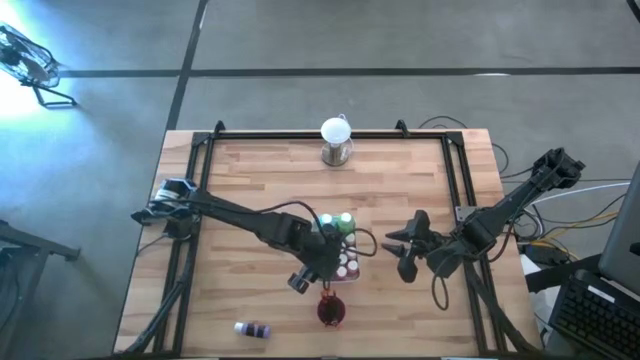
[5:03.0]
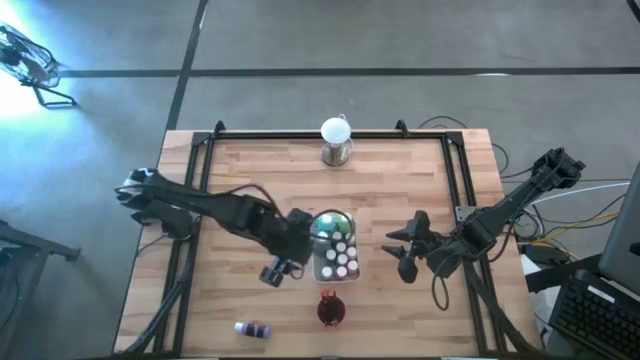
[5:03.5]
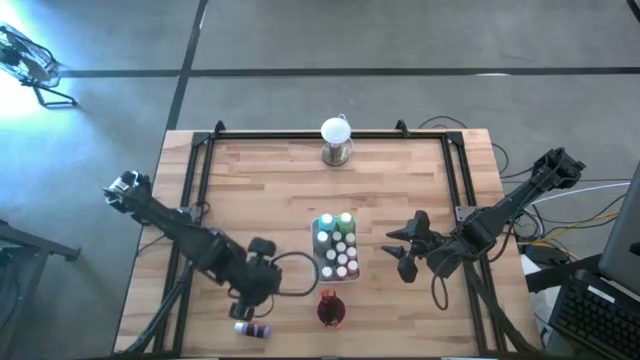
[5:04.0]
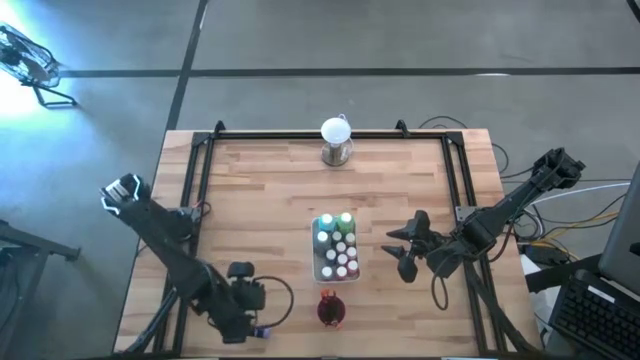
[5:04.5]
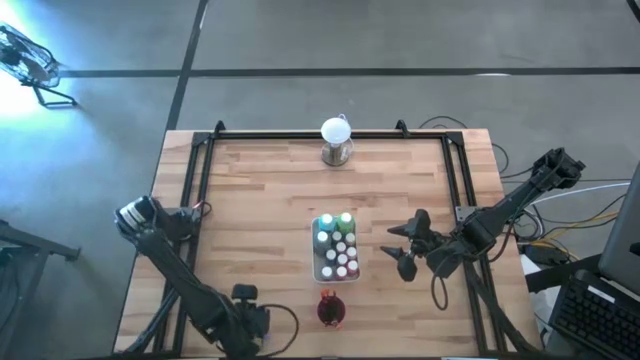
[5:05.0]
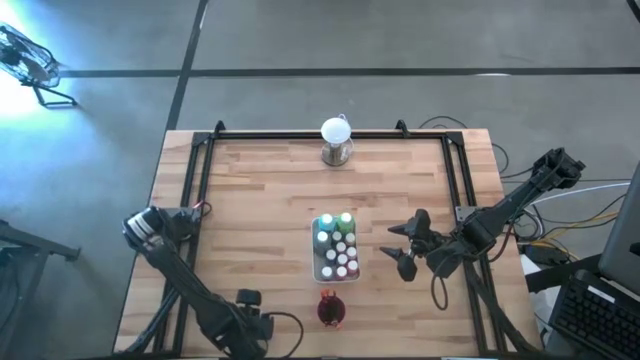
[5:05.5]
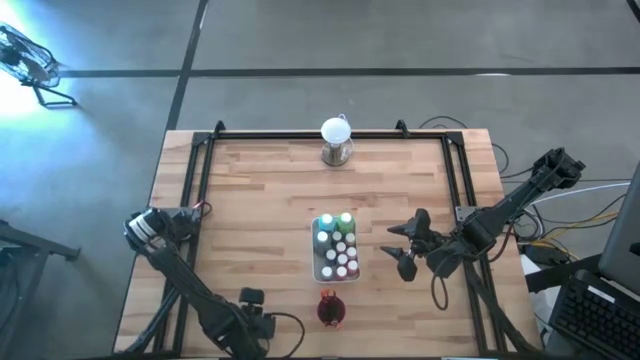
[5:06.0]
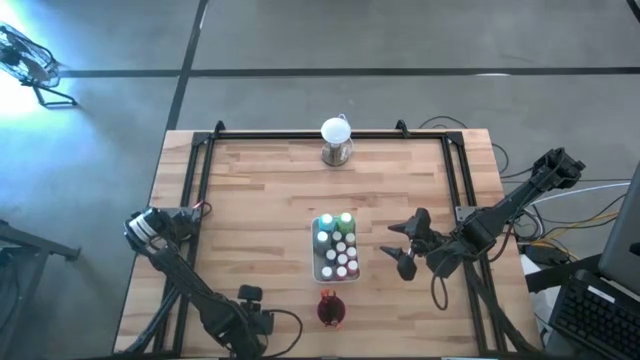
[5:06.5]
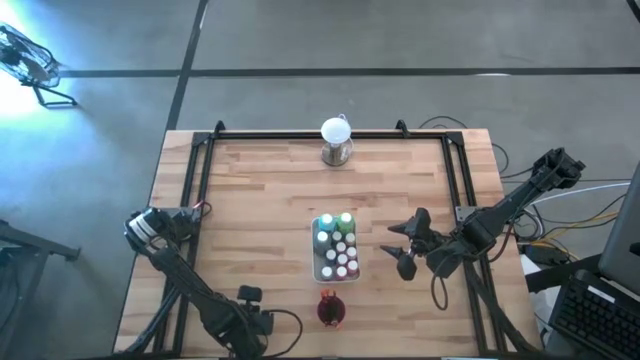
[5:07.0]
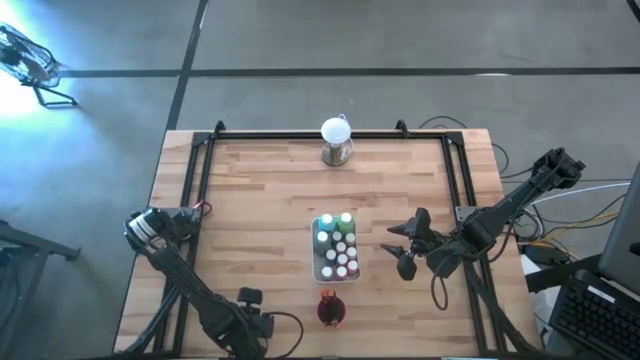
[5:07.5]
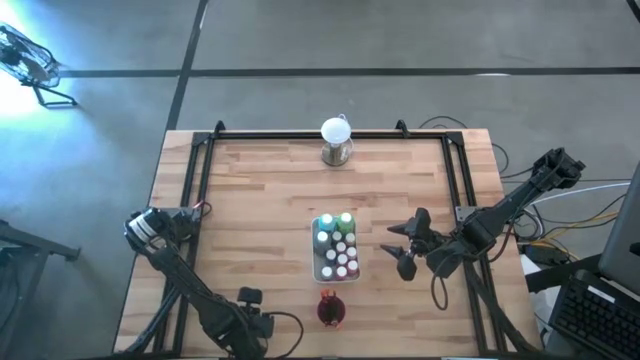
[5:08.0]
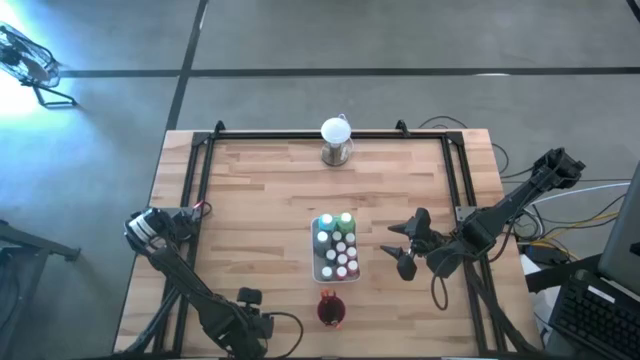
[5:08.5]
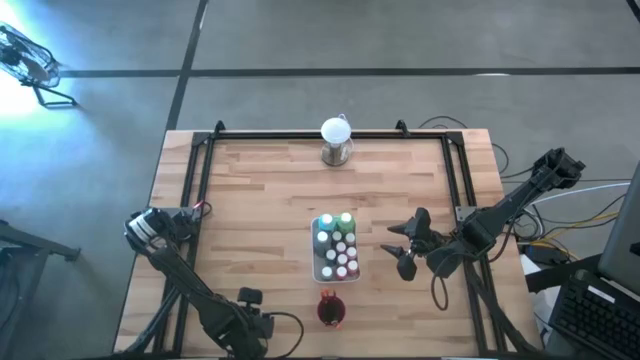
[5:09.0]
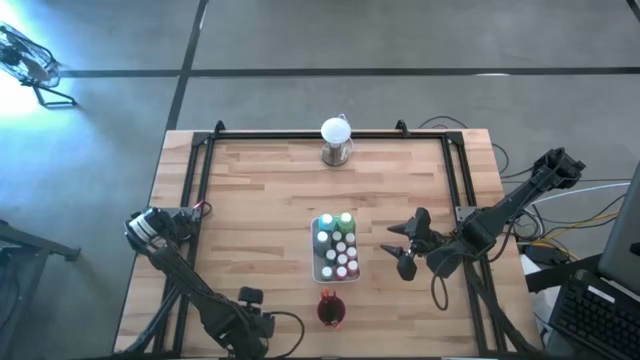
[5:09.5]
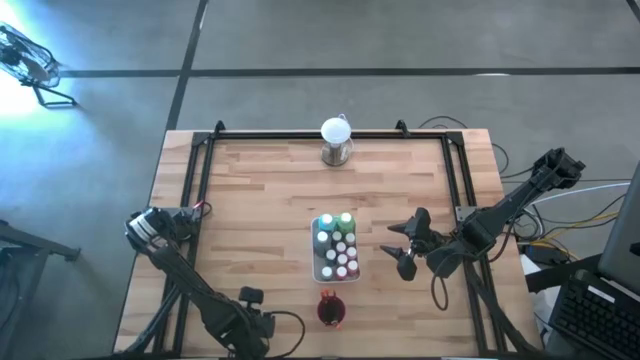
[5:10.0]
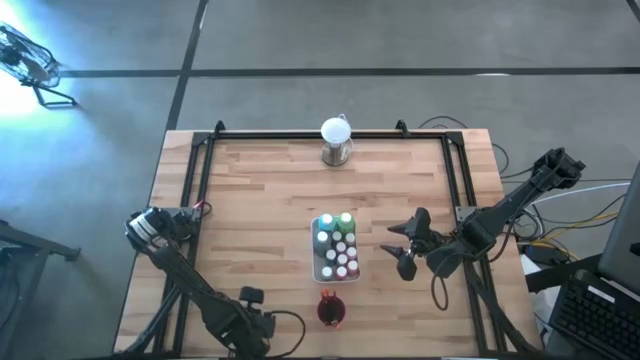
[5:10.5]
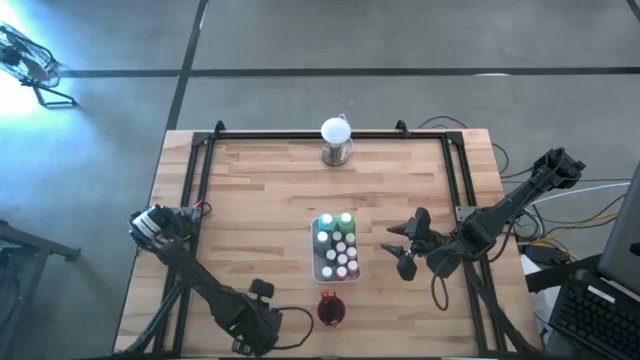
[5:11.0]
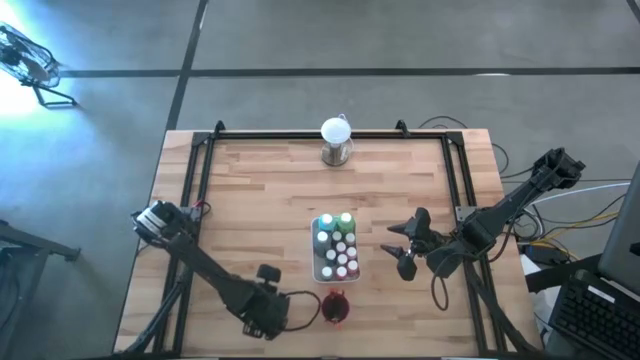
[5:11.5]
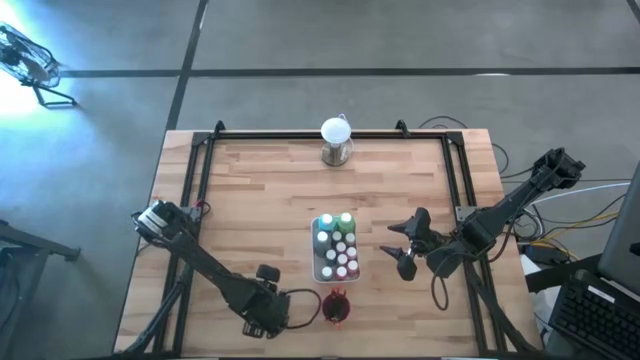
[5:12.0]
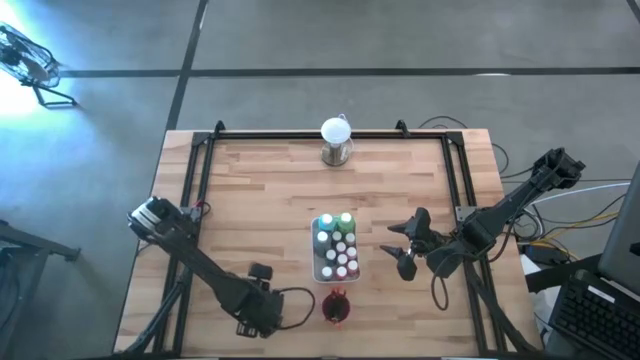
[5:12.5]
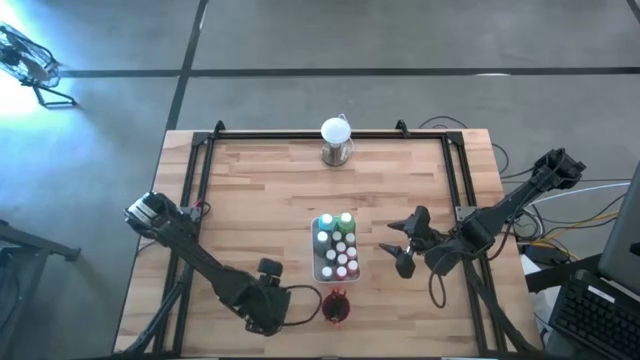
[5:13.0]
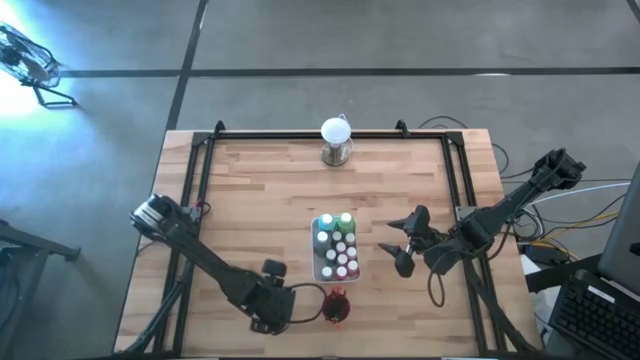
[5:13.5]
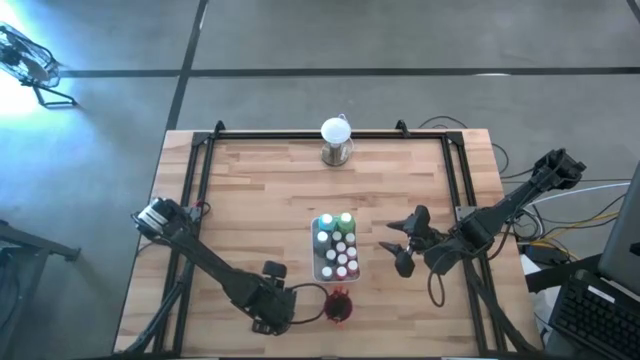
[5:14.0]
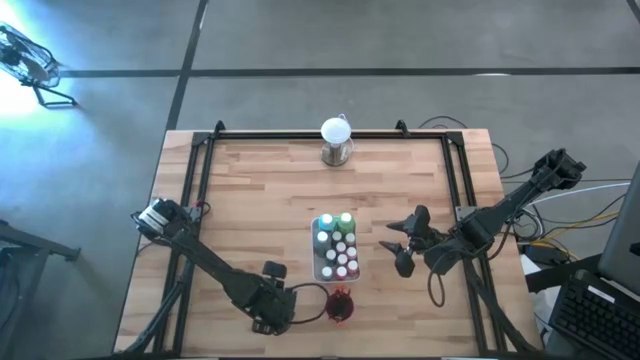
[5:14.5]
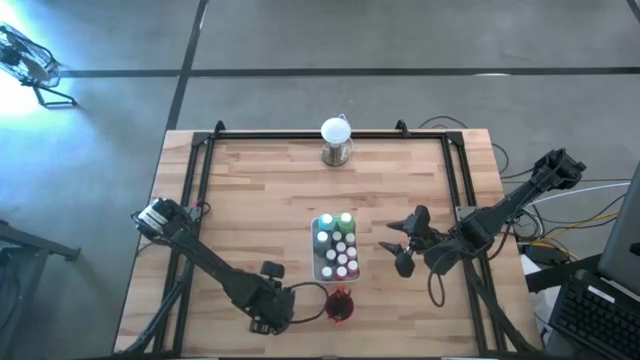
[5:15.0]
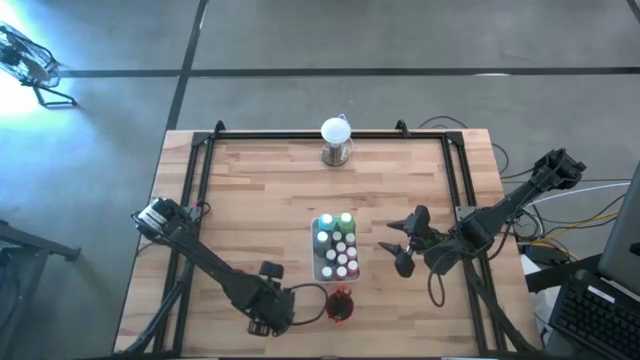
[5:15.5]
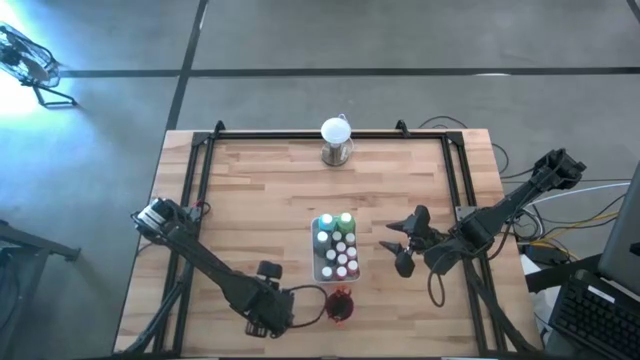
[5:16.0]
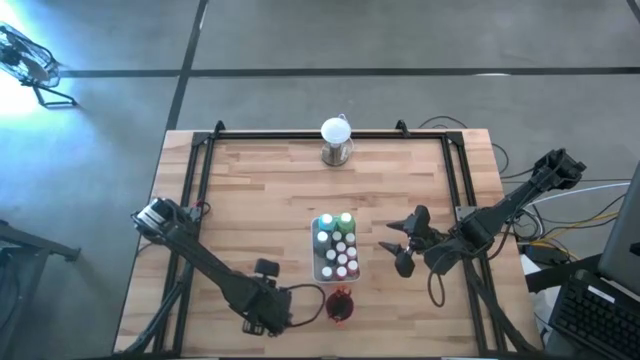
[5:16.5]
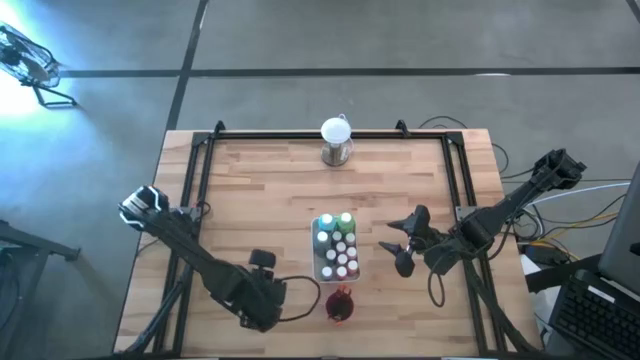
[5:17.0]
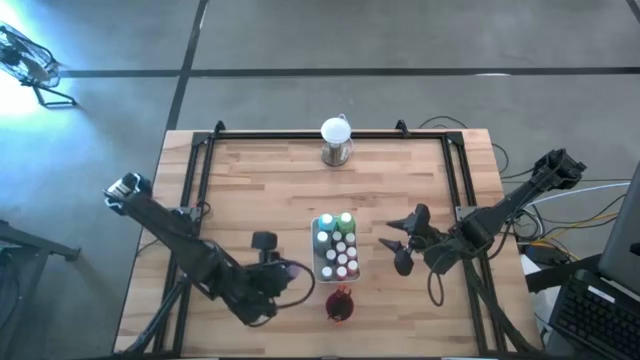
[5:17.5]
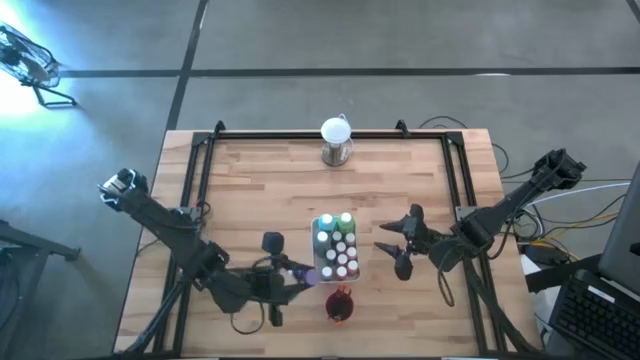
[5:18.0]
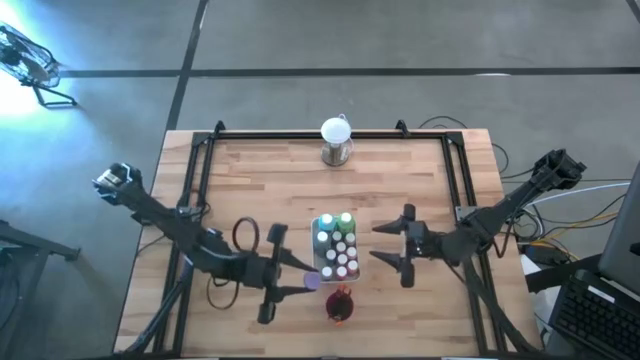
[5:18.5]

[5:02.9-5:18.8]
Task: Pick & Place Paint Supplies
Put the purple paint bottle into the white bin
